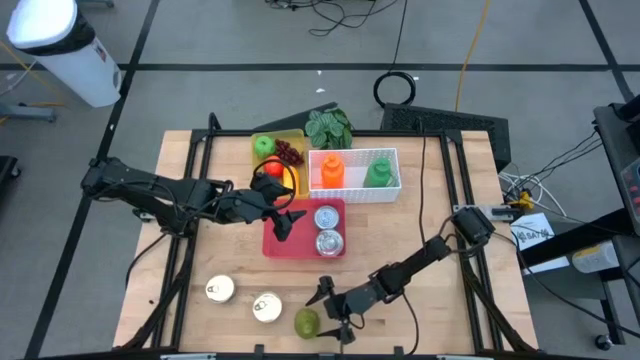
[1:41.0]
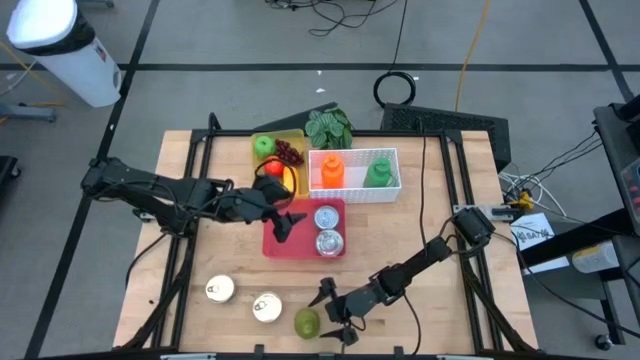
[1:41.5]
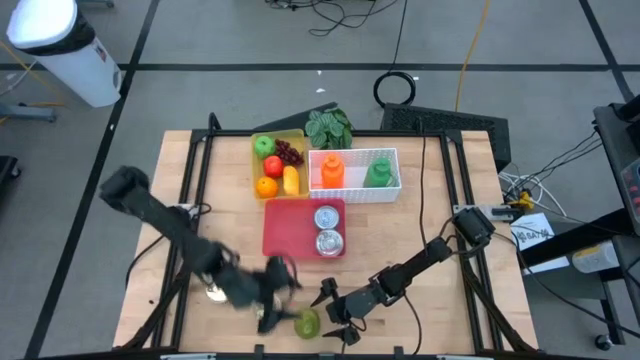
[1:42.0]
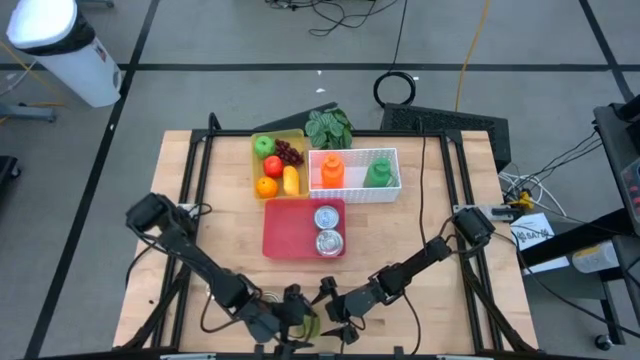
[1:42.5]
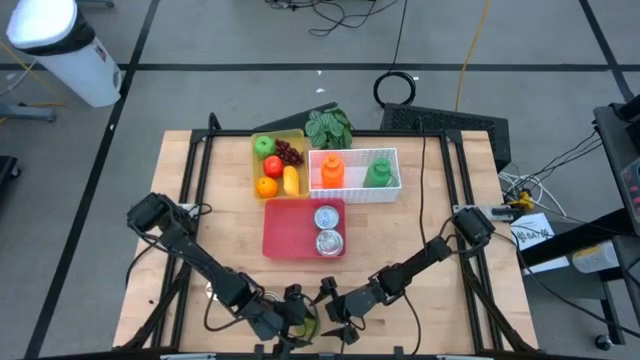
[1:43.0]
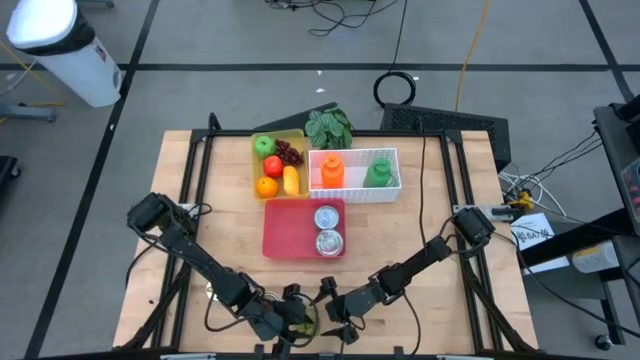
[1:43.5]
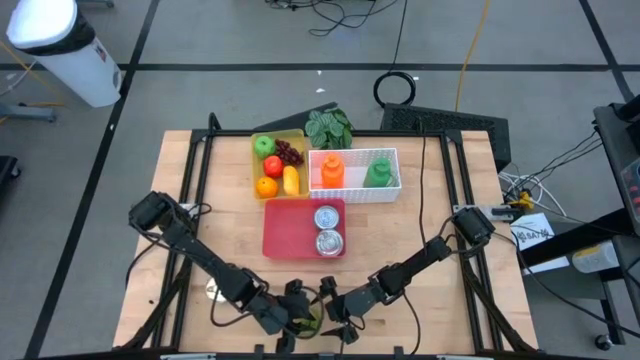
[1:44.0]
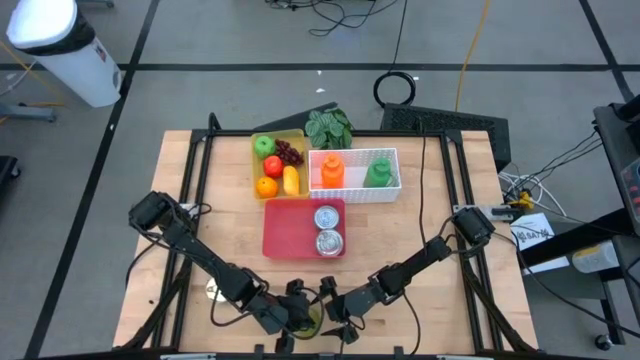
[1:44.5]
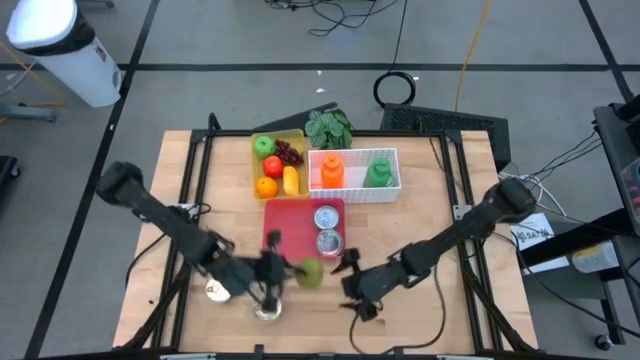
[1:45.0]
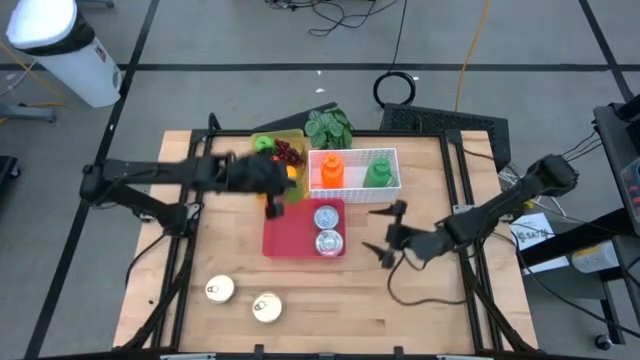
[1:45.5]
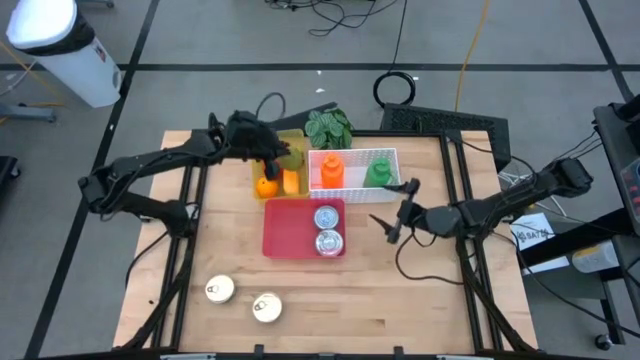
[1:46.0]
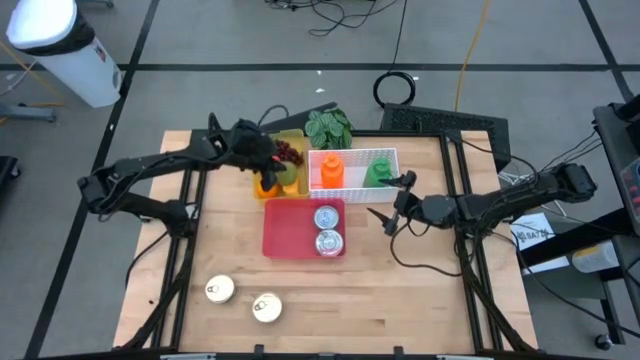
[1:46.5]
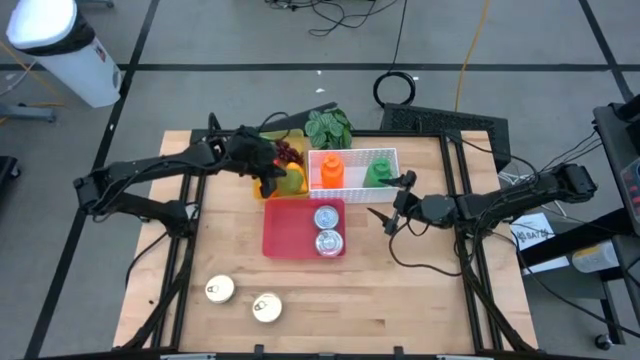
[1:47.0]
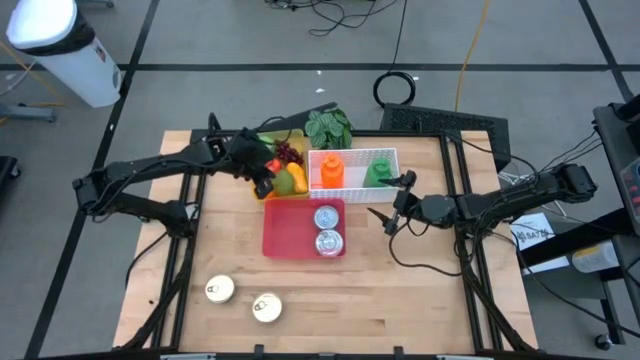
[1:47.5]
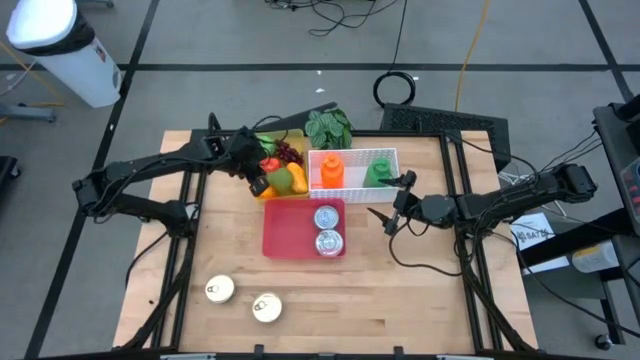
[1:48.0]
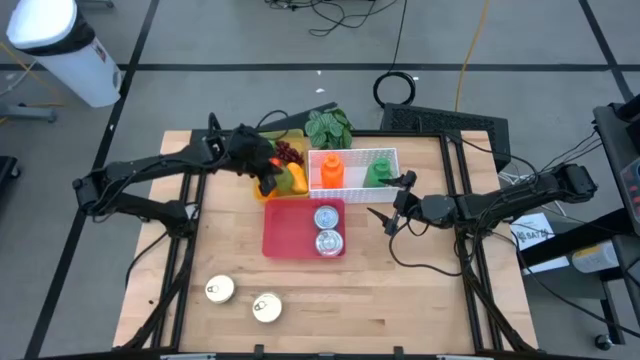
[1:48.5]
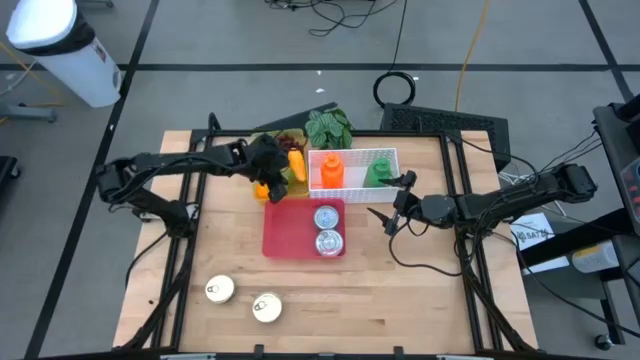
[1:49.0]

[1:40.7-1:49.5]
Task: Pick & Place Food Item
Put the green pear in the yellow bin

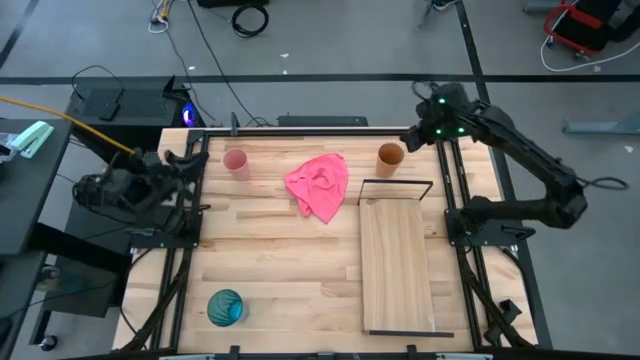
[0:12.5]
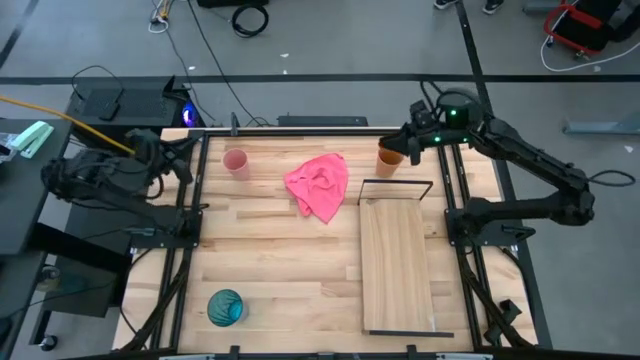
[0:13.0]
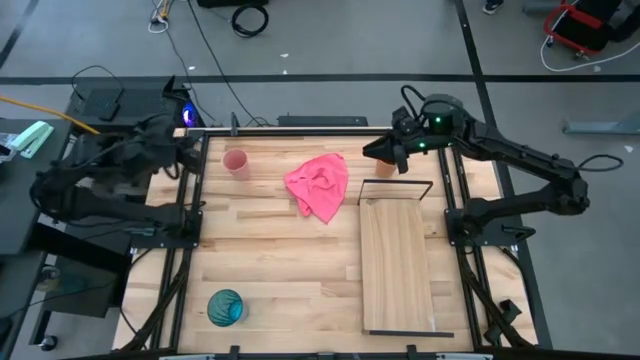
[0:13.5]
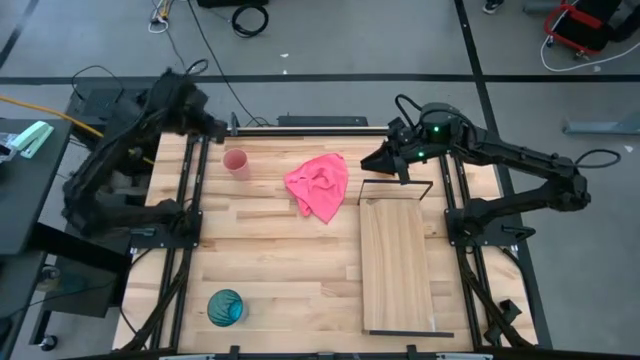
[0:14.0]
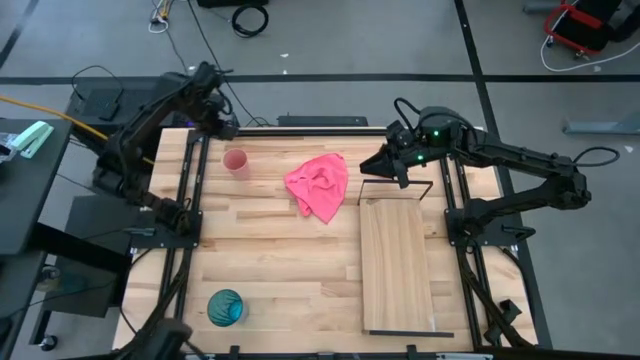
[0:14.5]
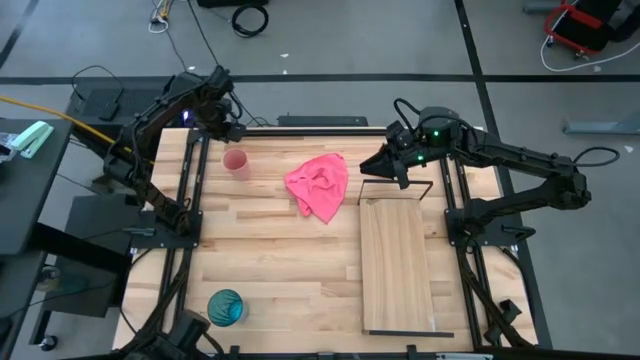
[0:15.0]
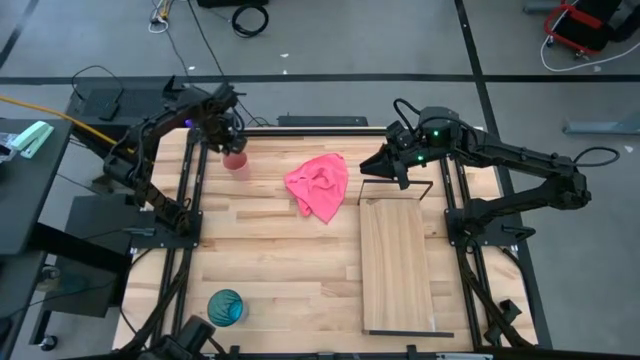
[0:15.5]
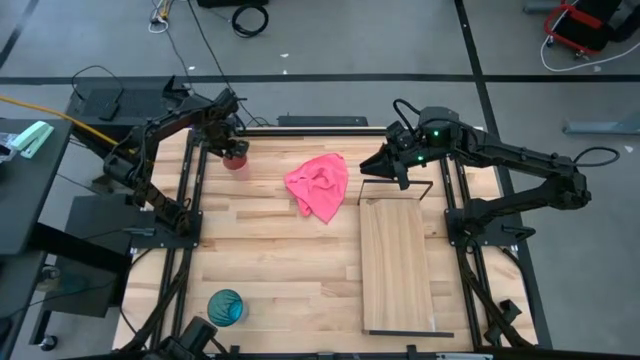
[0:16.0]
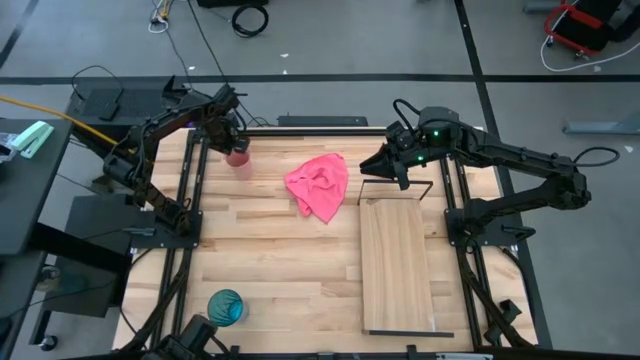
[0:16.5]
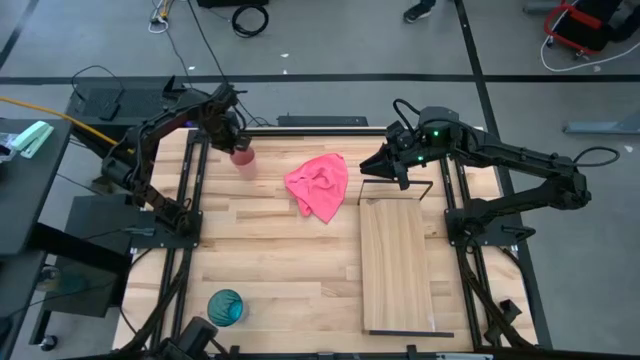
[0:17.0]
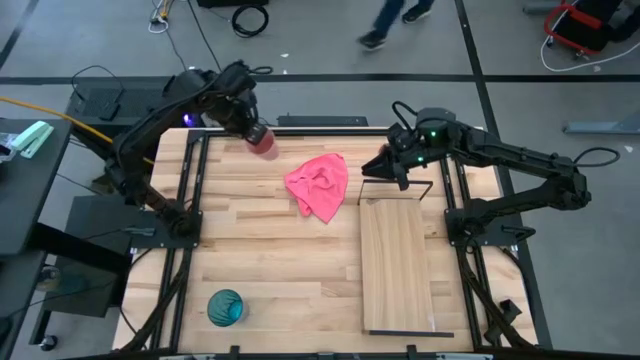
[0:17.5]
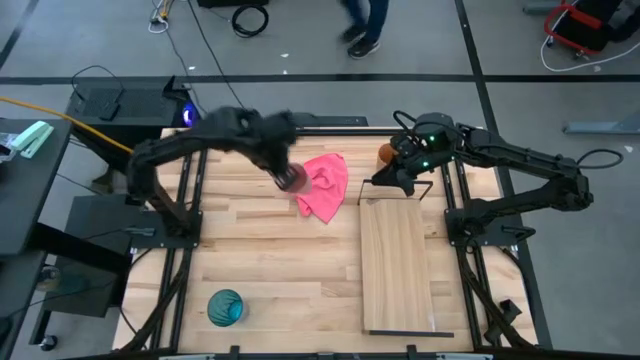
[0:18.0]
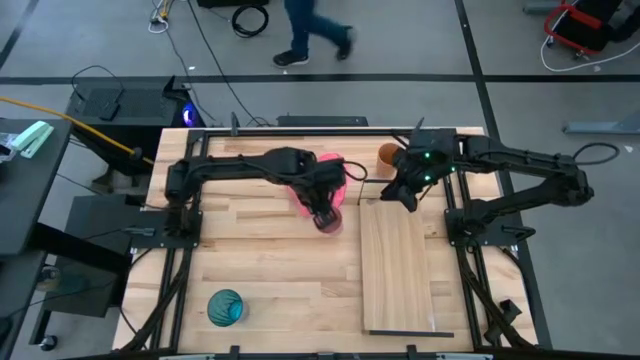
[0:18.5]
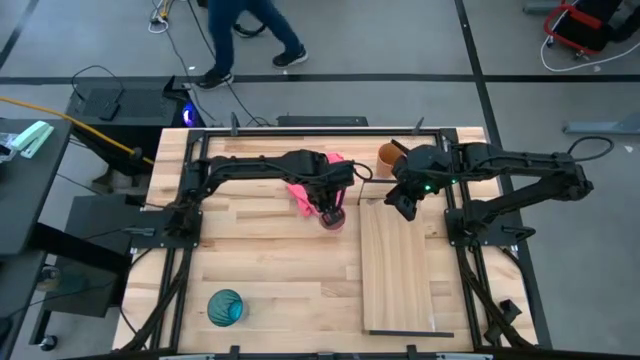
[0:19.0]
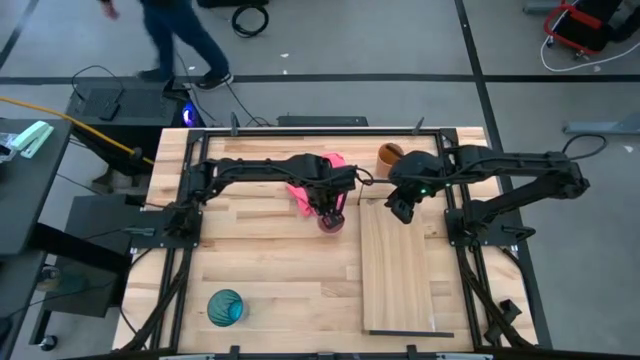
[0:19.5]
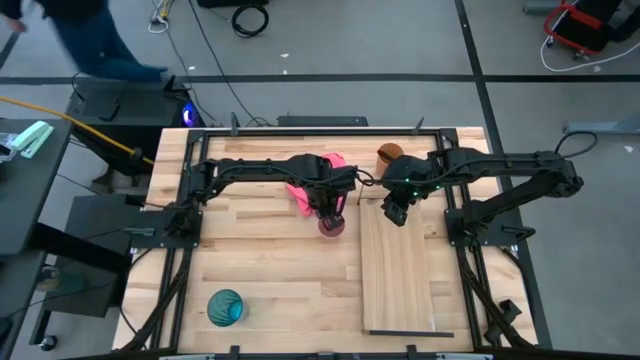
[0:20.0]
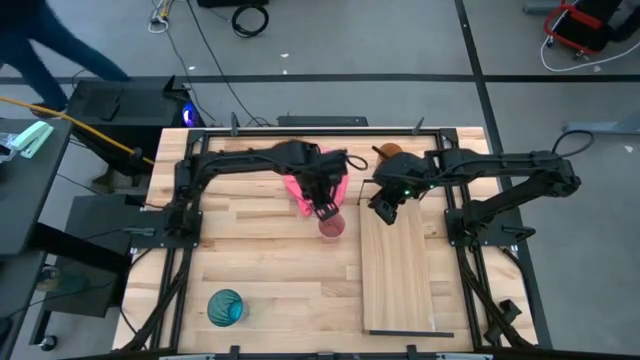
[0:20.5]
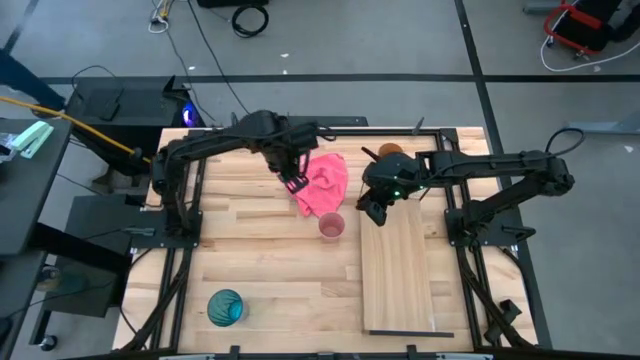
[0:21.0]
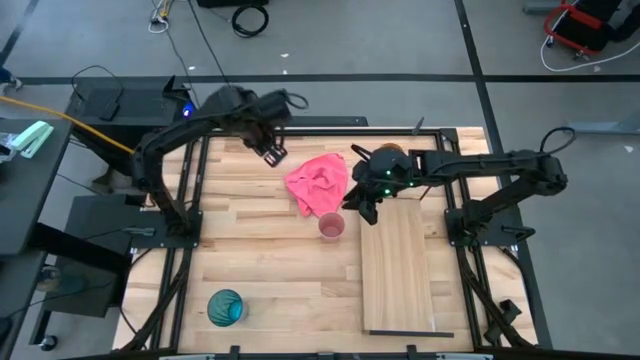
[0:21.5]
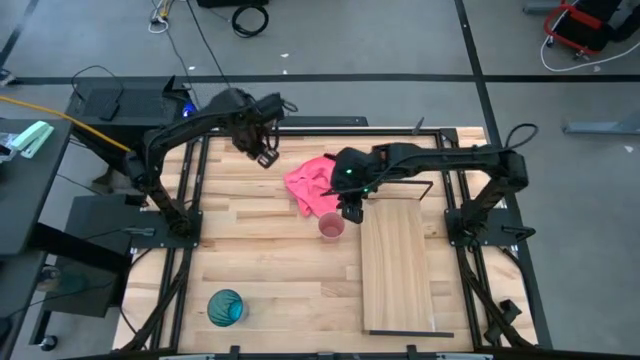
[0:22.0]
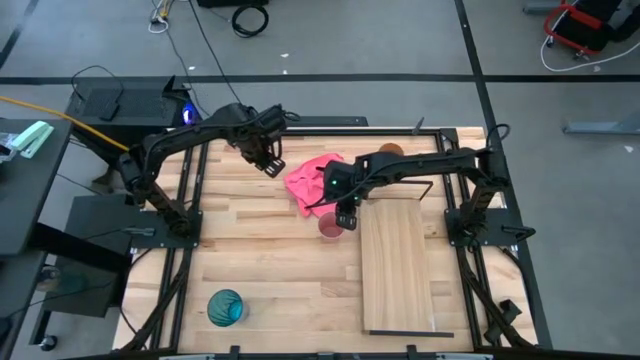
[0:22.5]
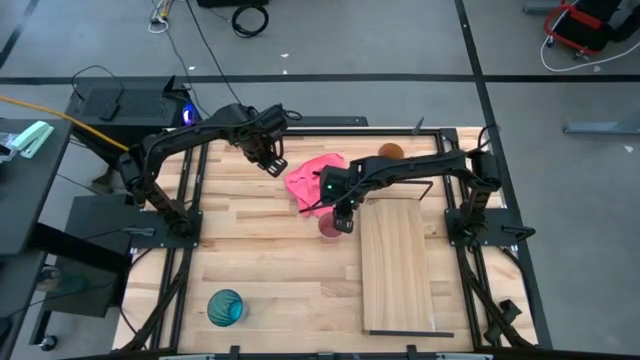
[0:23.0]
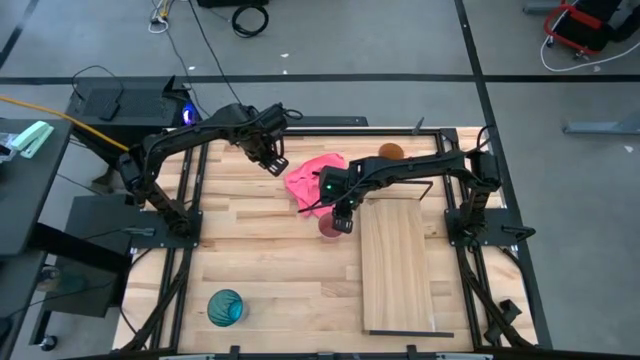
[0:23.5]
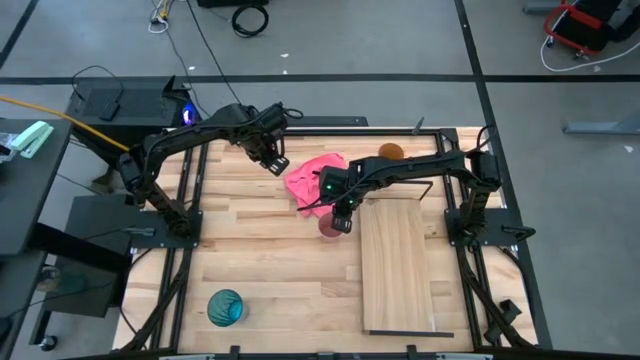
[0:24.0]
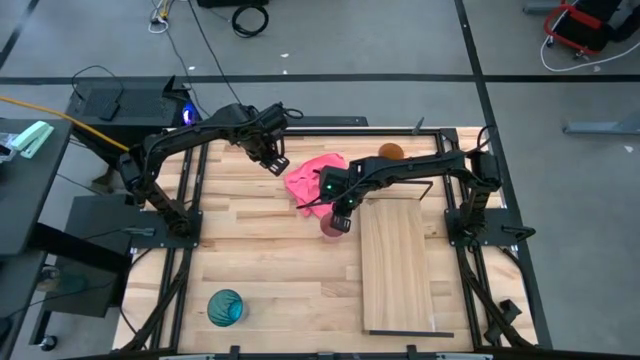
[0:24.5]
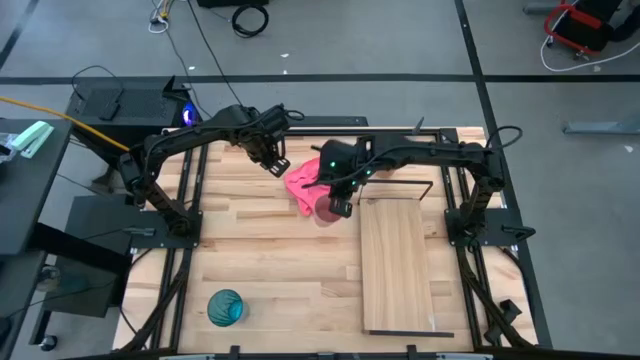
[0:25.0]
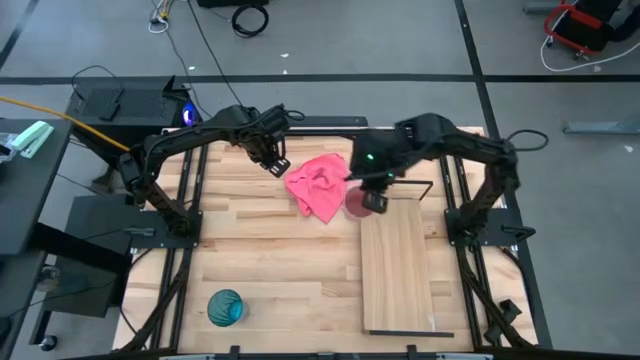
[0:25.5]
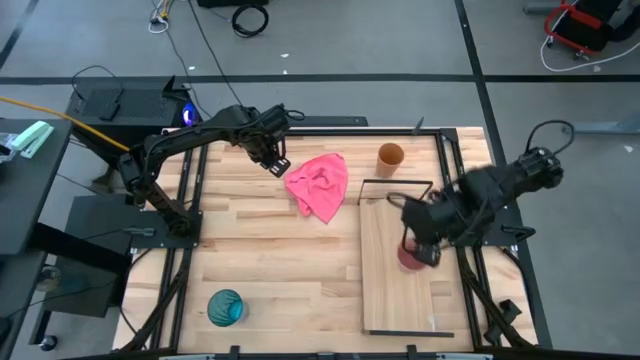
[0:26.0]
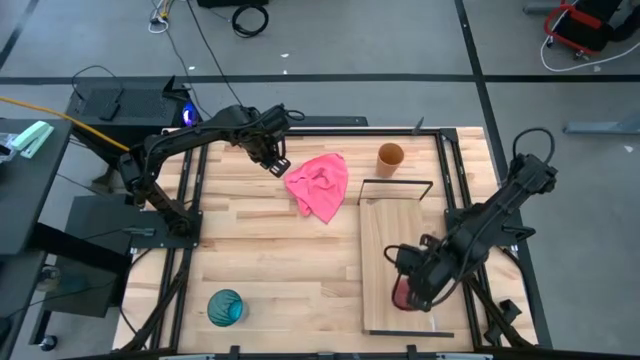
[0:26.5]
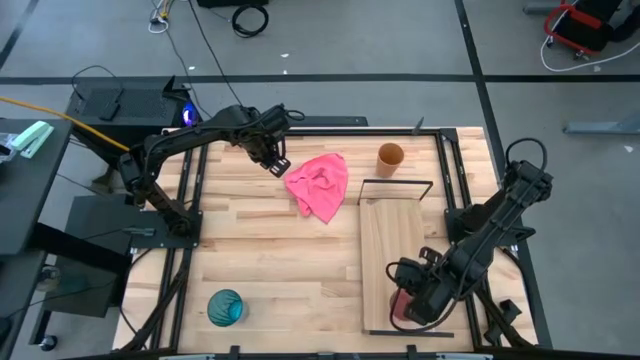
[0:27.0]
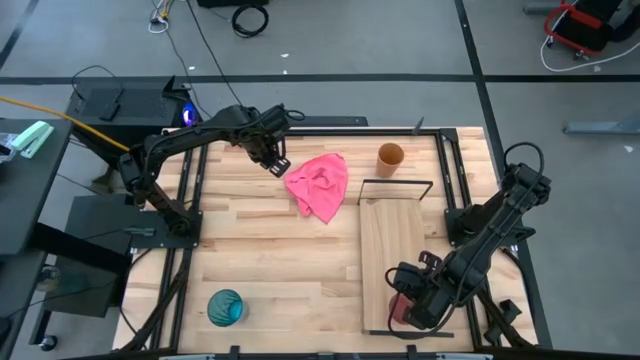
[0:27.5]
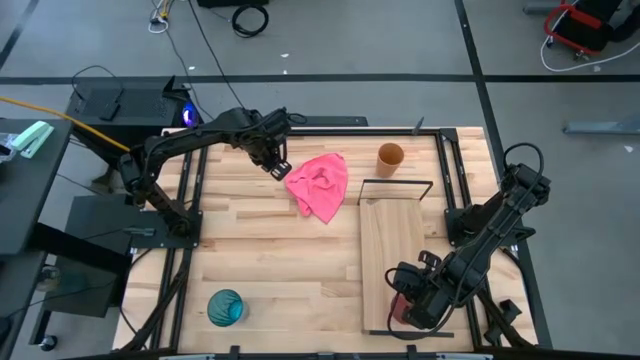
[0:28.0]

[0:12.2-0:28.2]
Task: Stack small to large cups/mugs on shelf
Put the pink cup on the shelf
